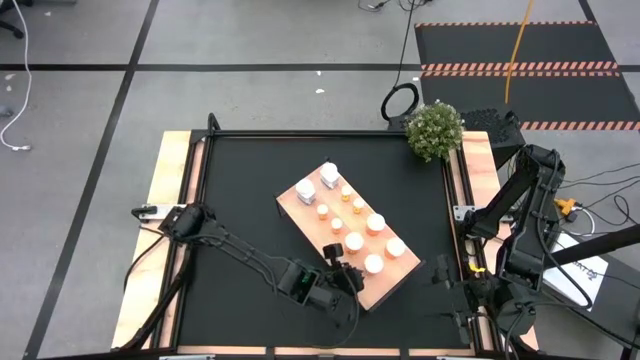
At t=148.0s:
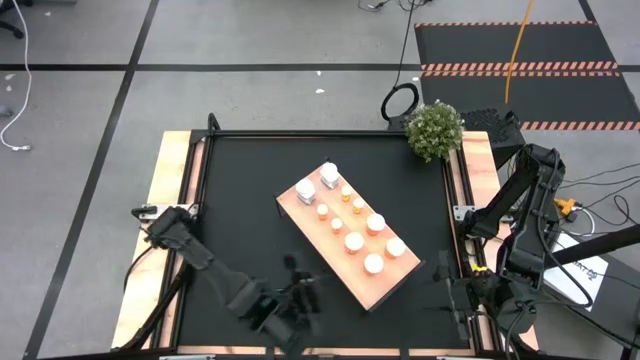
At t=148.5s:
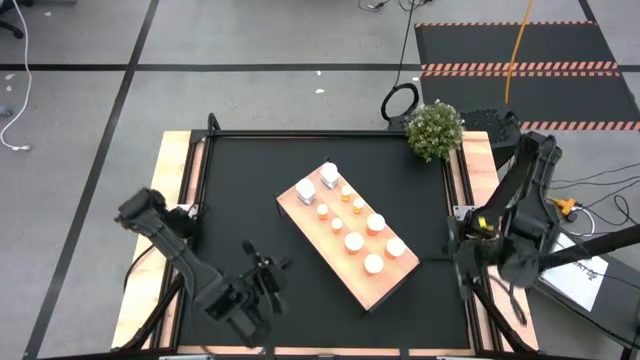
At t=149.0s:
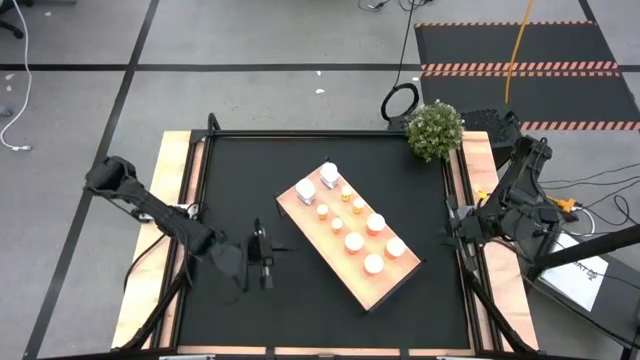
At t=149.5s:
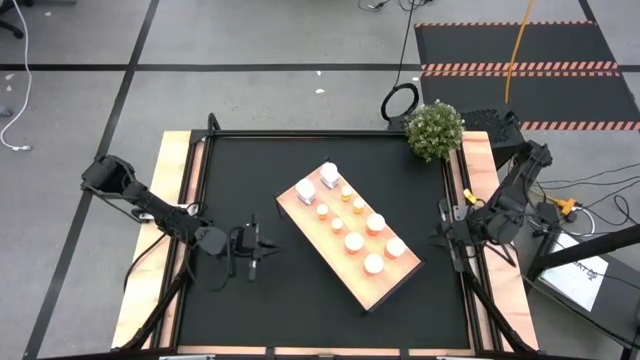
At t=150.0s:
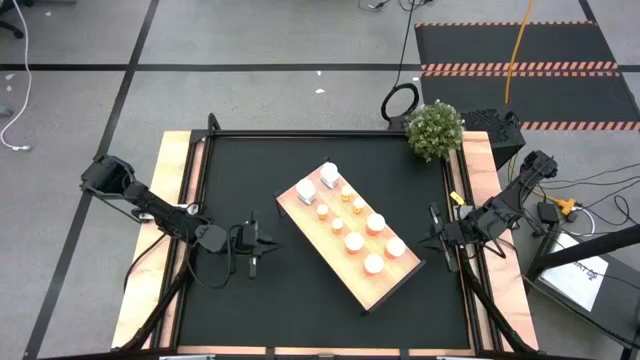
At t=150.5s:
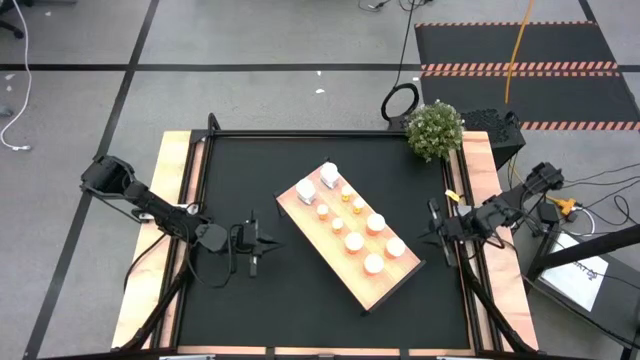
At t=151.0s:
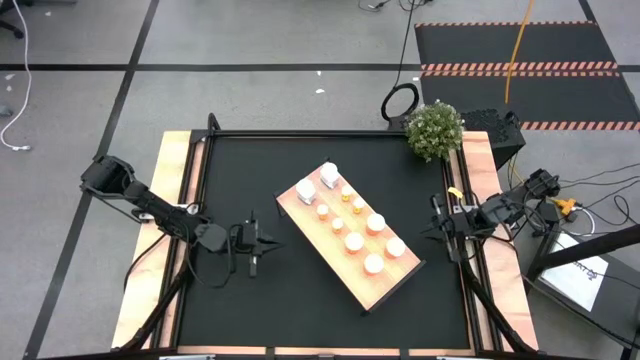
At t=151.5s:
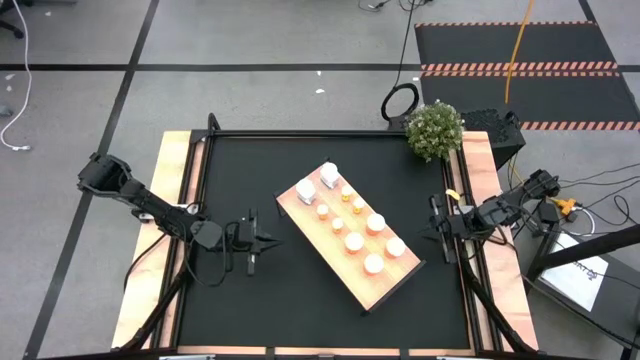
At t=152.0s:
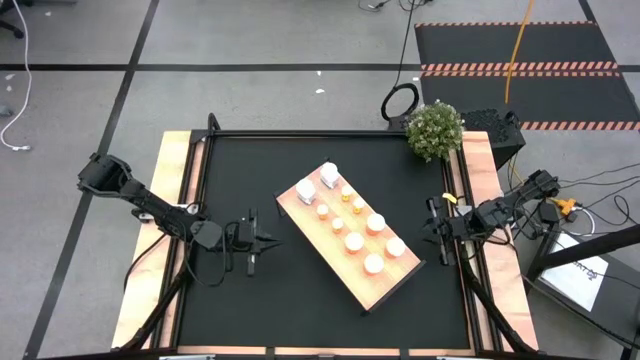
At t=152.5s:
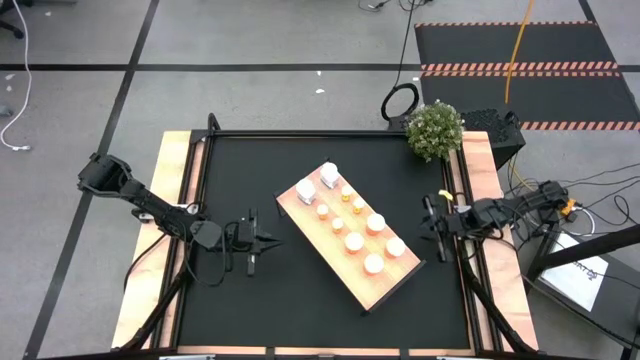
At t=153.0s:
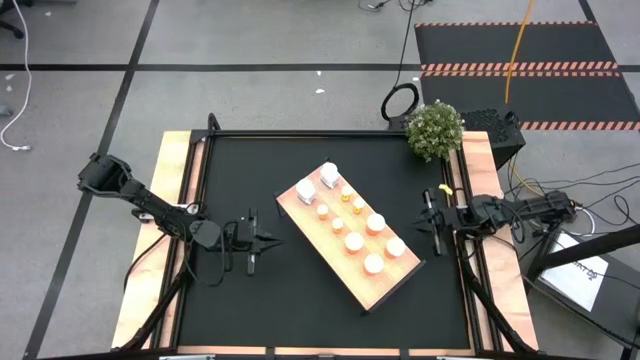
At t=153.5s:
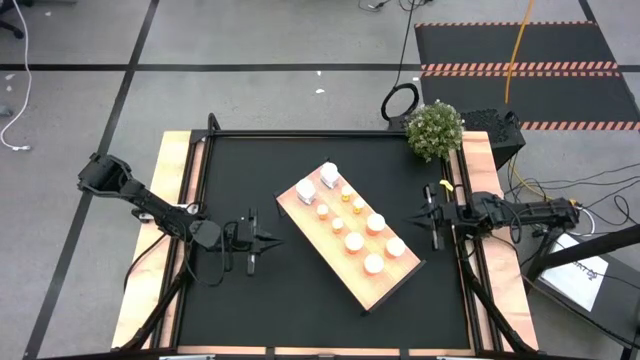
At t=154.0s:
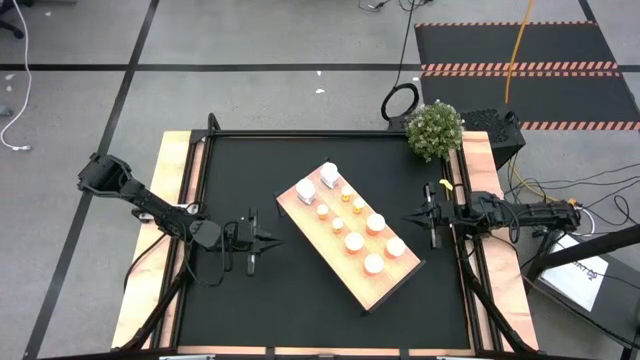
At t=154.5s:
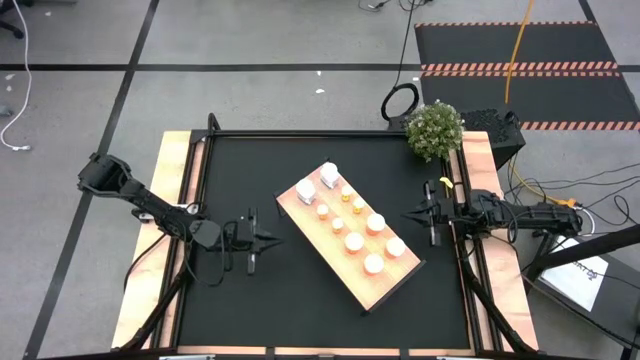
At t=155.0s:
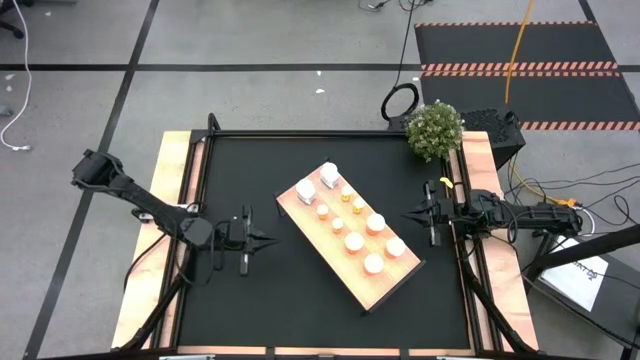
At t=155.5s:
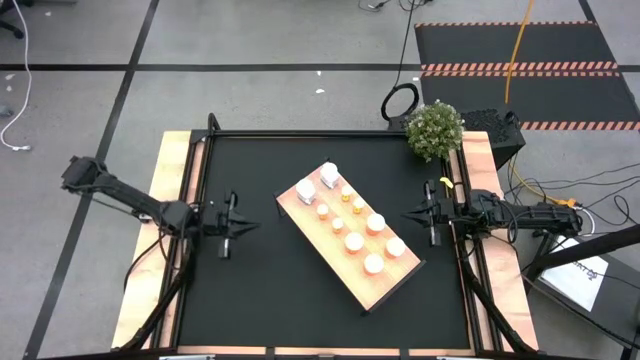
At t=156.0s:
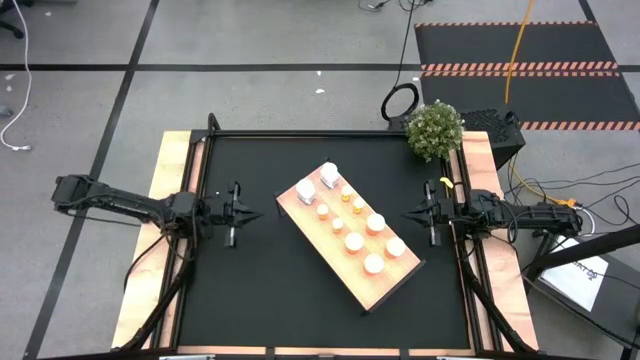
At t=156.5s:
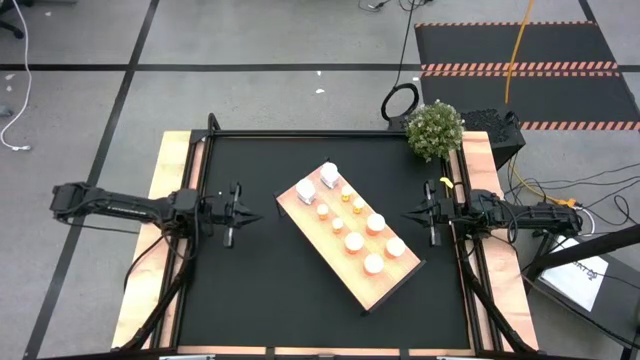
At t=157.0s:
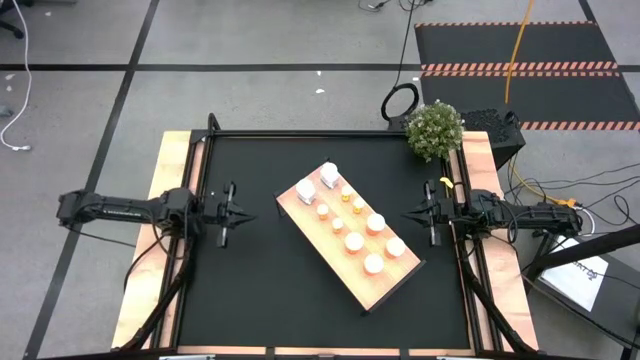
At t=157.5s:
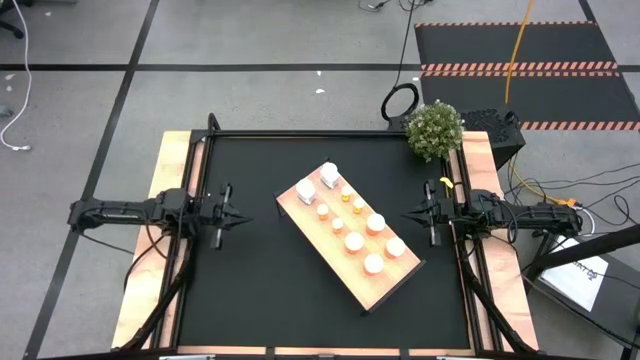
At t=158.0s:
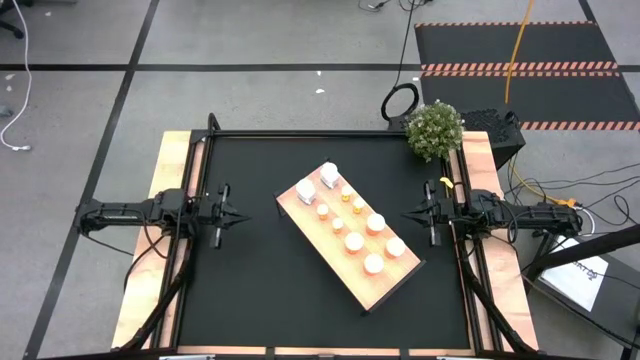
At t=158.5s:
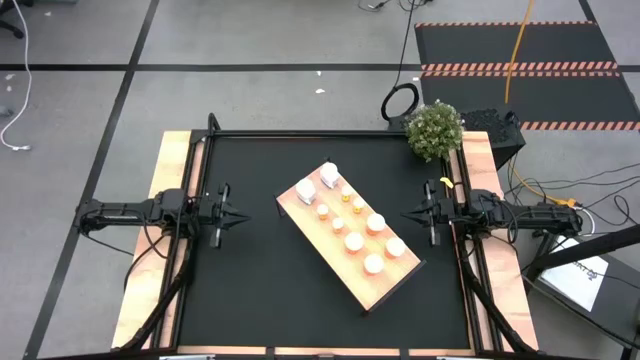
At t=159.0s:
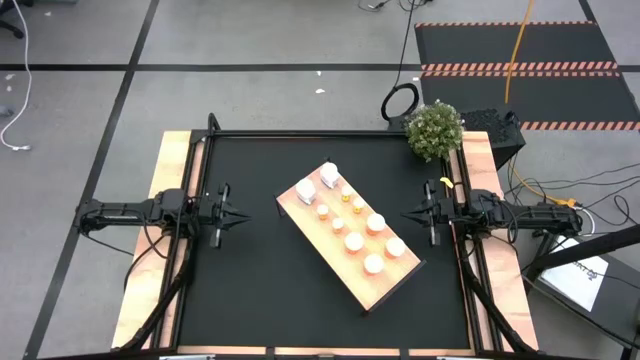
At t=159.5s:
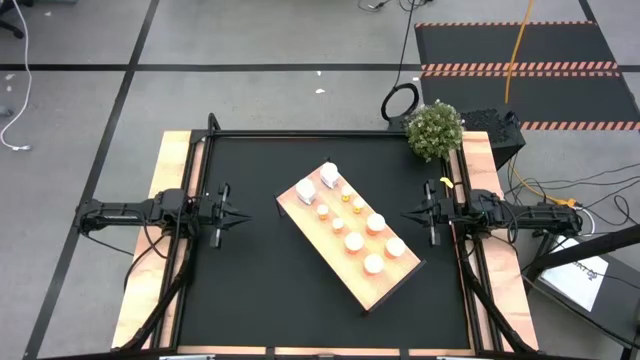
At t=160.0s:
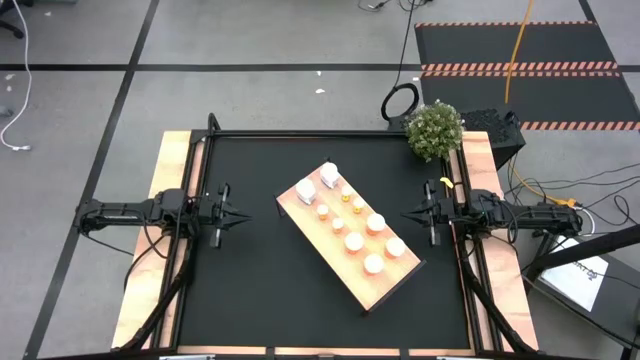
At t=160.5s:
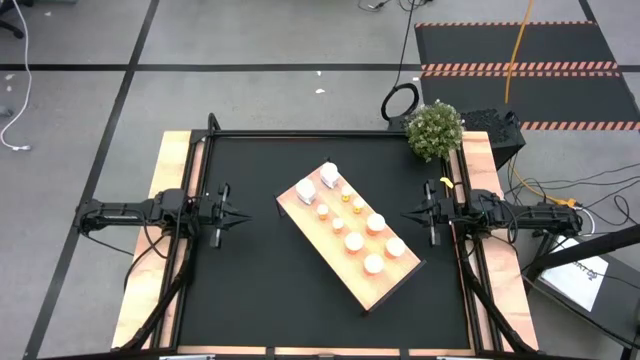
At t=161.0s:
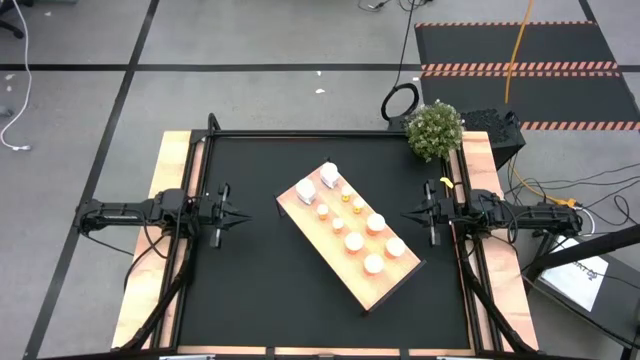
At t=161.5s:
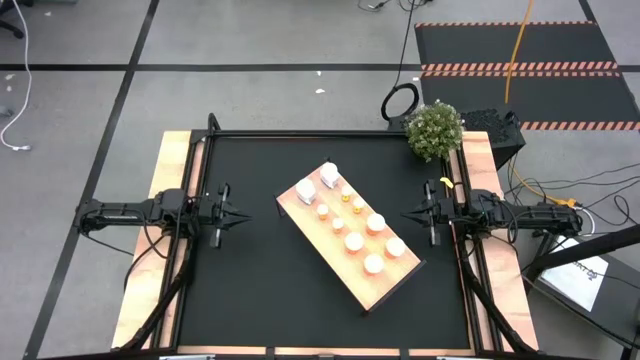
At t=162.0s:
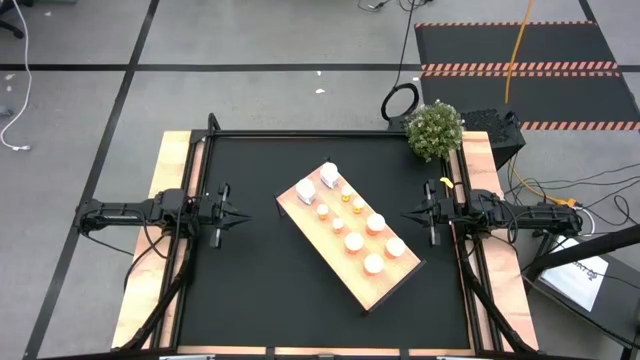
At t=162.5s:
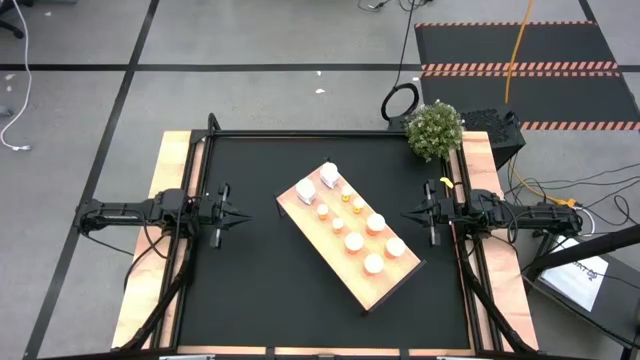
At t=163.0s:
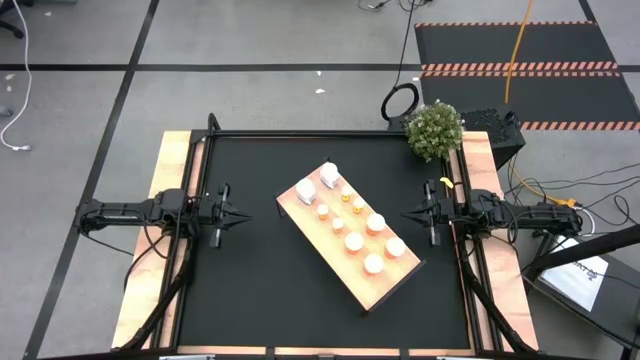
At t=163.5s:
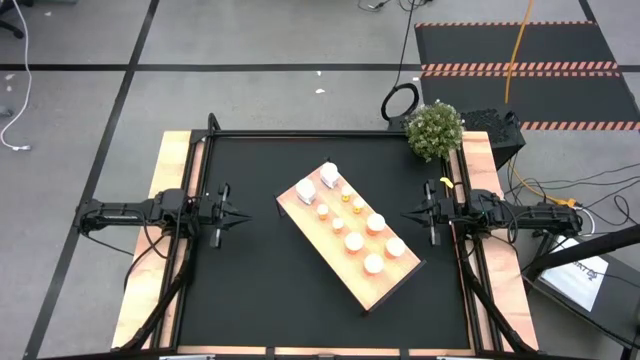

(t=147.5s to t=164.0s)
Task: Pick and place medicine bottles onto shelf by color
Return to Home Position

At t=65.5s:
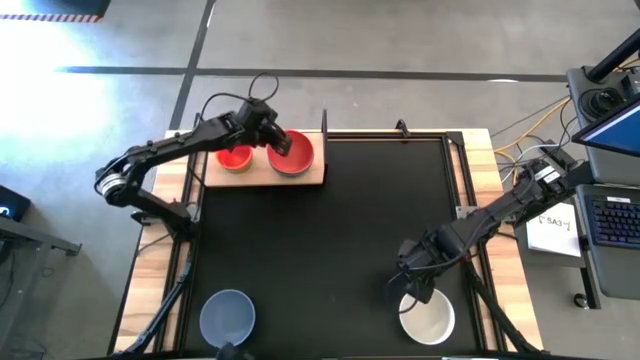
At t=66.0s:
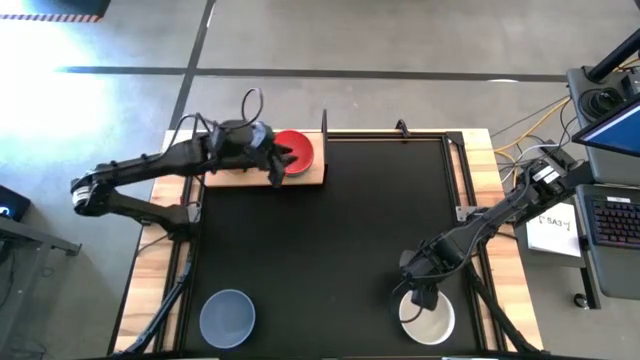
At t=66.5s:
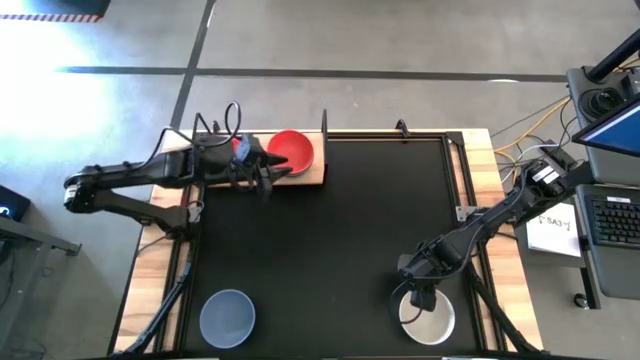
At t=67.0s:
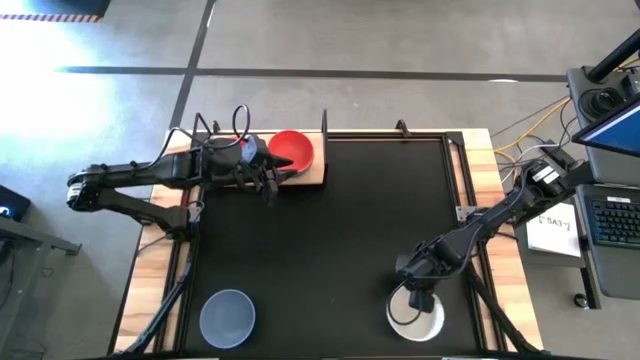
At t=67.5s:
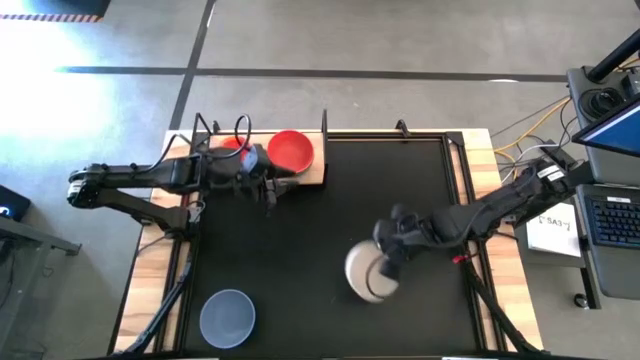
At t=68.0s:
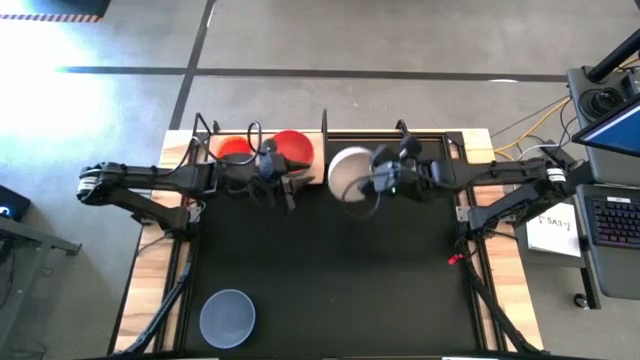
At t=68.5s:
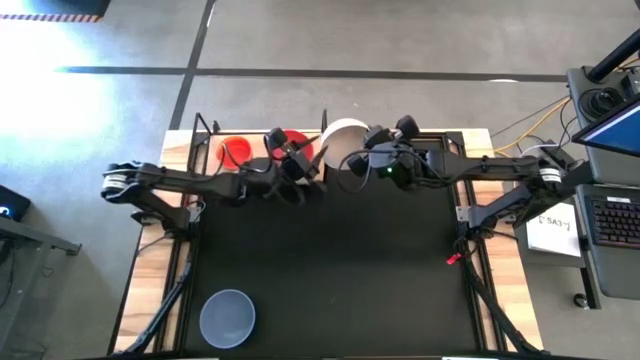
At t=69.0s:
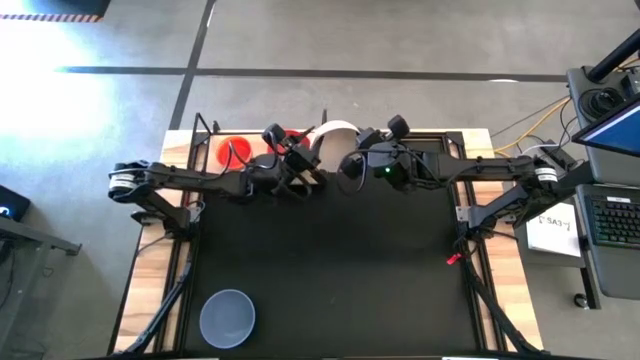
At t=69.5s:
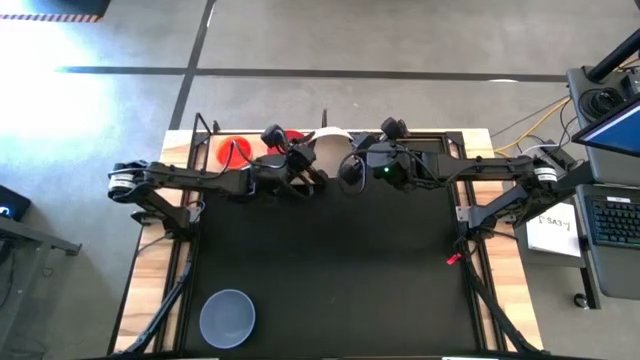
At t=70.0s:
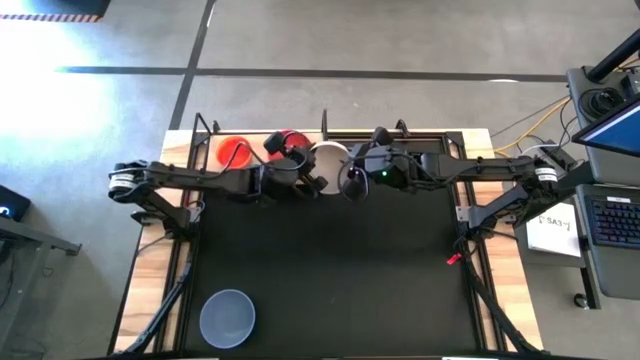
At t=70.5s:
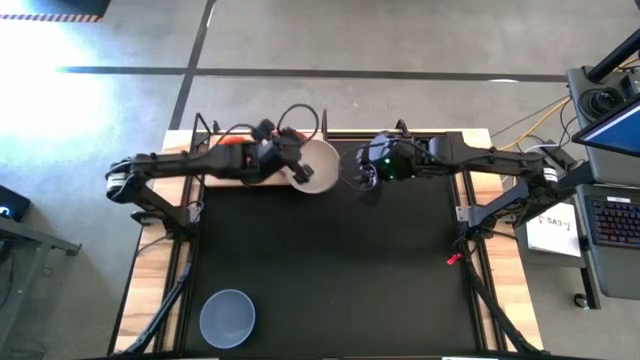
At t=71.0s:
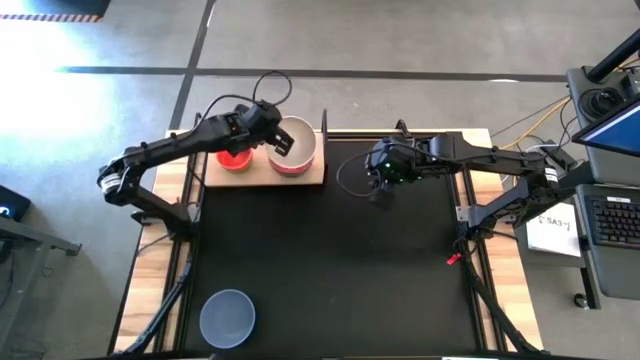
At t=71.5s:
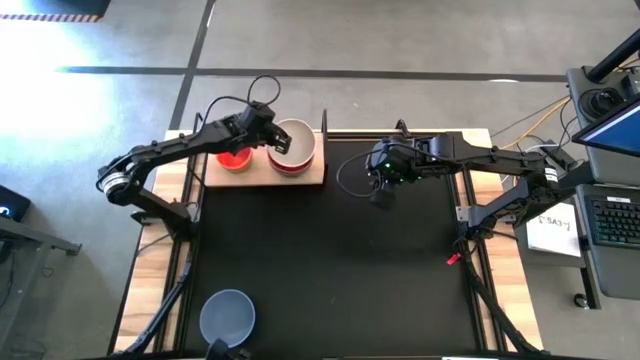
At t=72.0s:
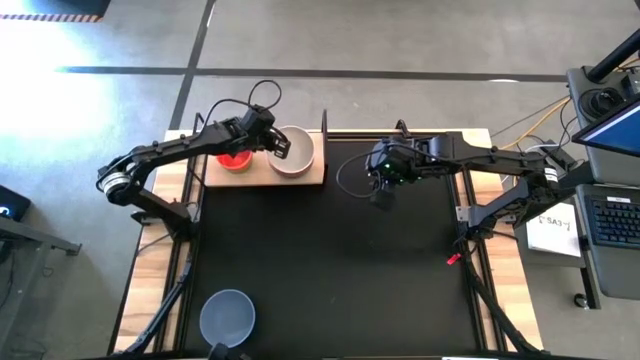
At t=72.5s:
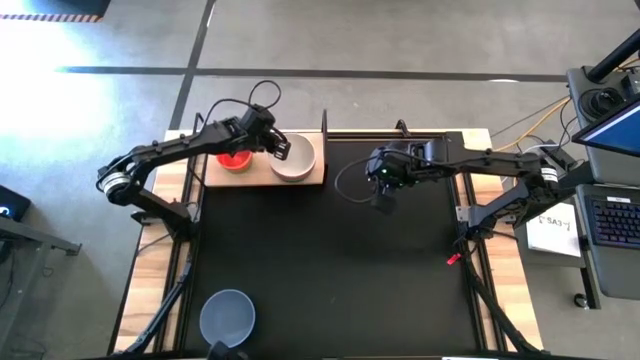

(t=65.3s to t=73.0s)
Task: Place and stack bowls onto a shelf
Stack the large white bowl onto the orange bowl on the shelf
